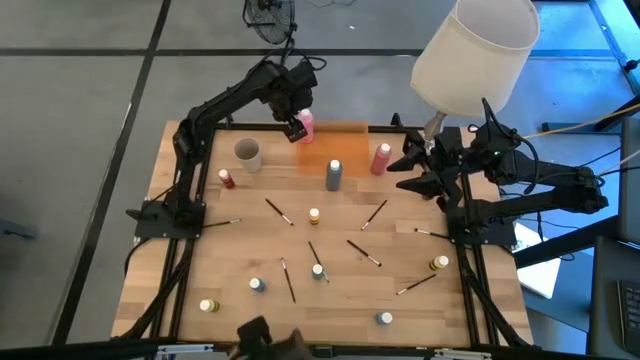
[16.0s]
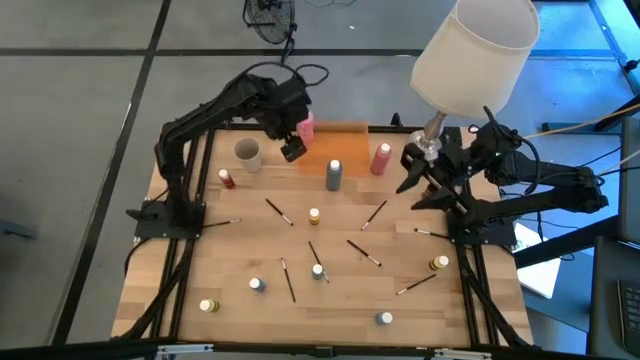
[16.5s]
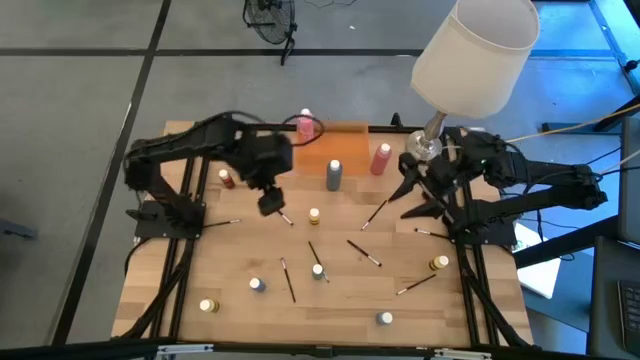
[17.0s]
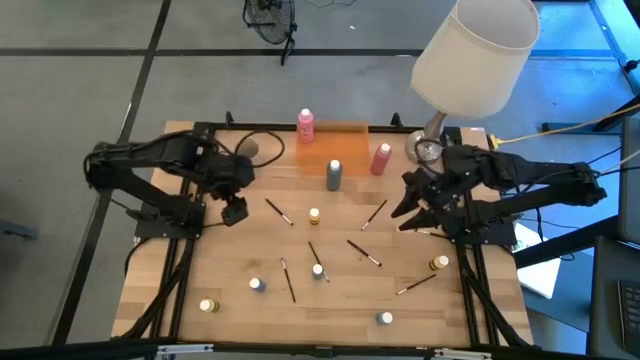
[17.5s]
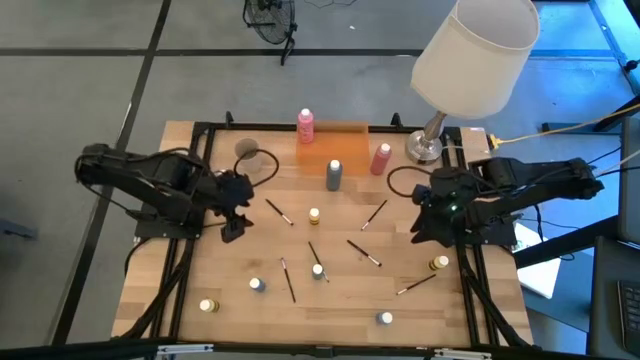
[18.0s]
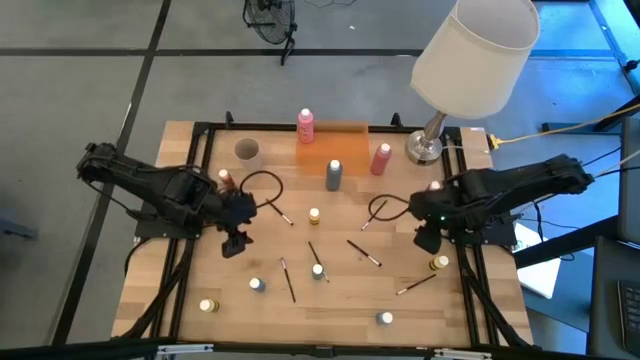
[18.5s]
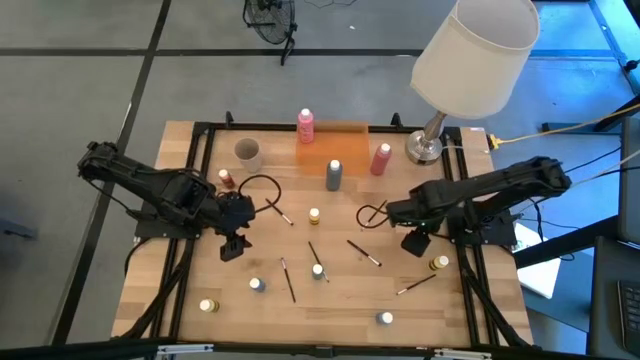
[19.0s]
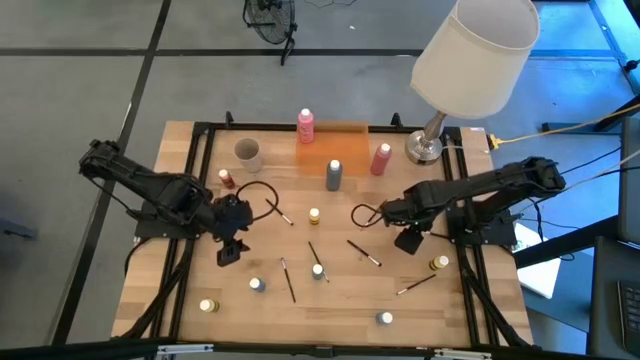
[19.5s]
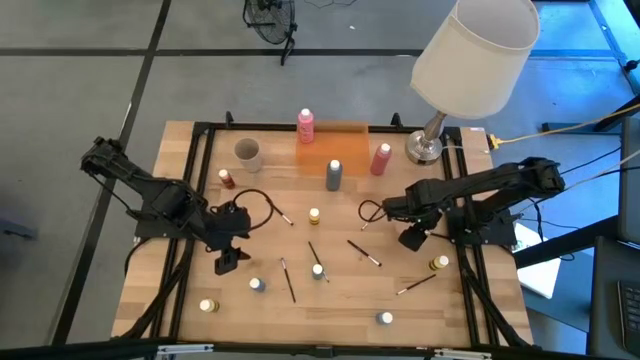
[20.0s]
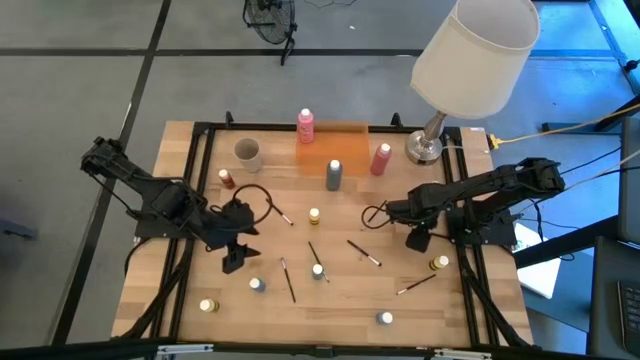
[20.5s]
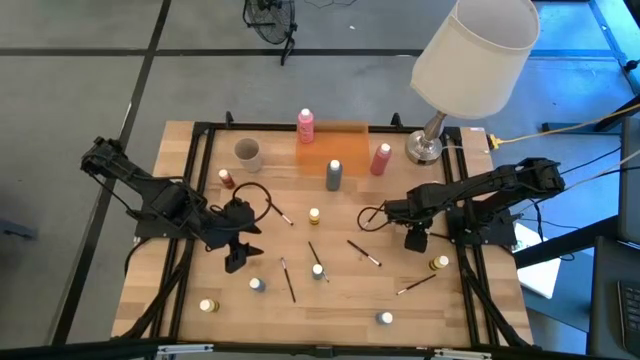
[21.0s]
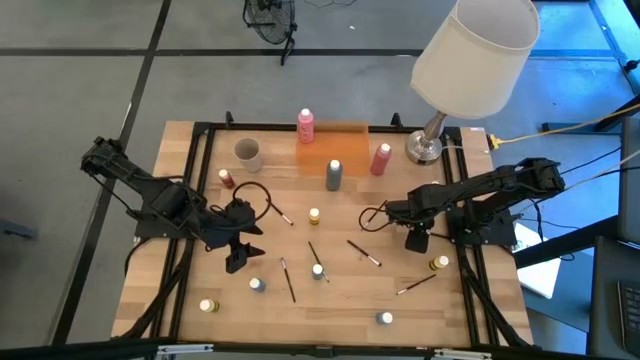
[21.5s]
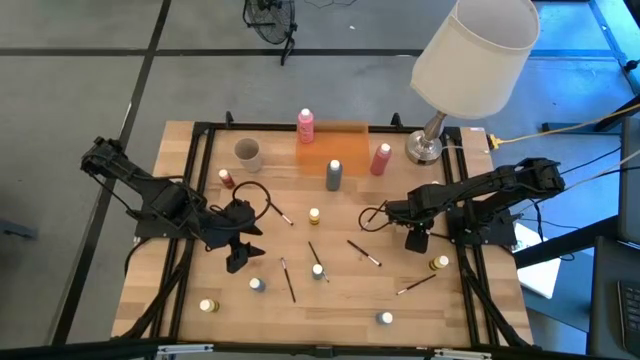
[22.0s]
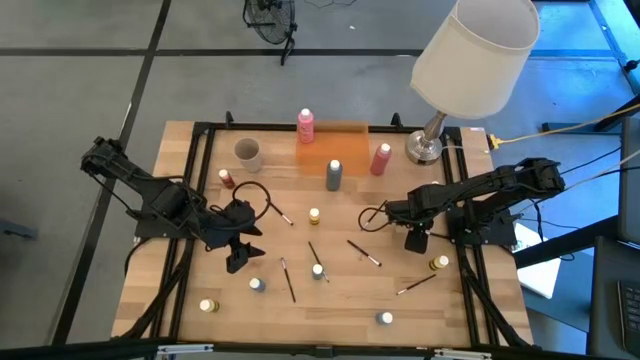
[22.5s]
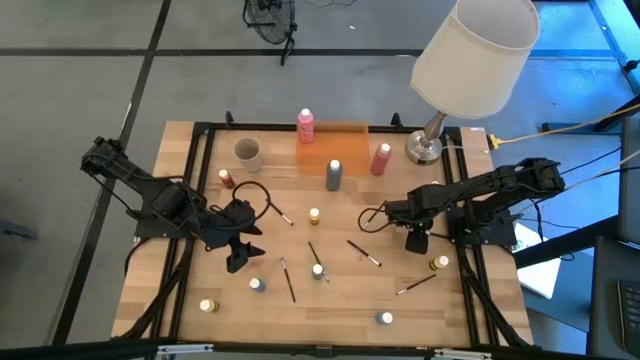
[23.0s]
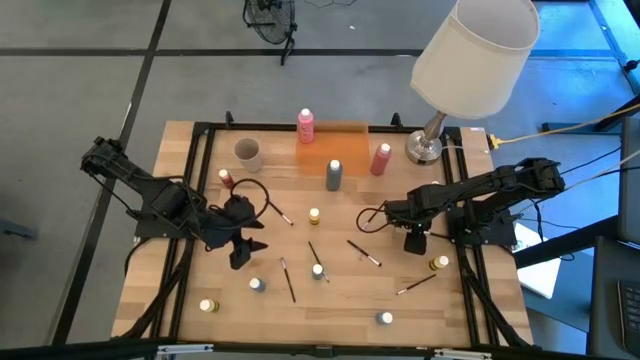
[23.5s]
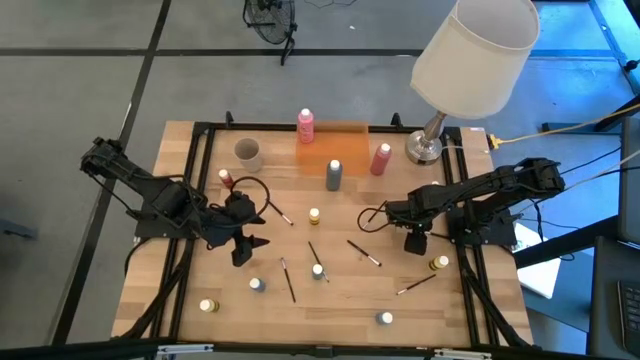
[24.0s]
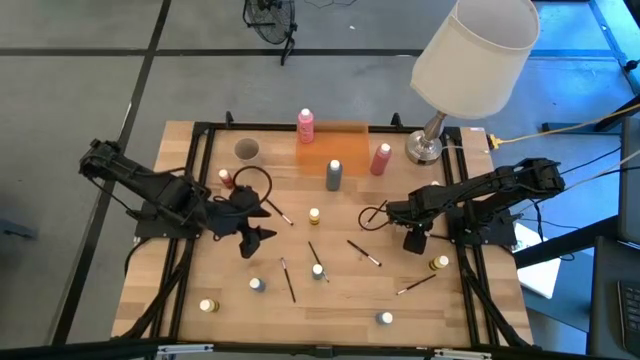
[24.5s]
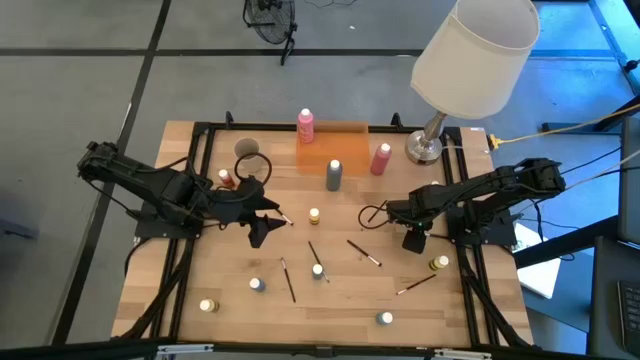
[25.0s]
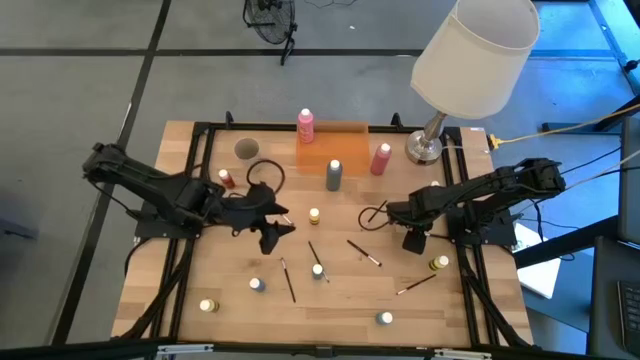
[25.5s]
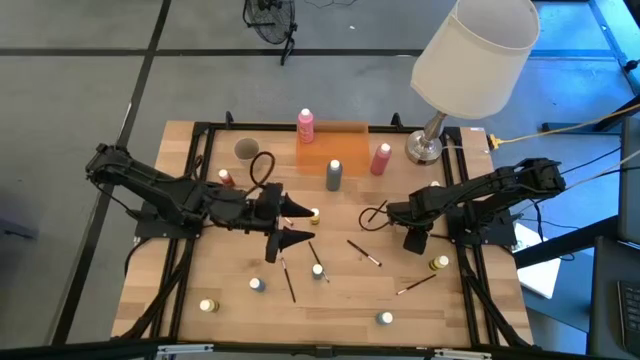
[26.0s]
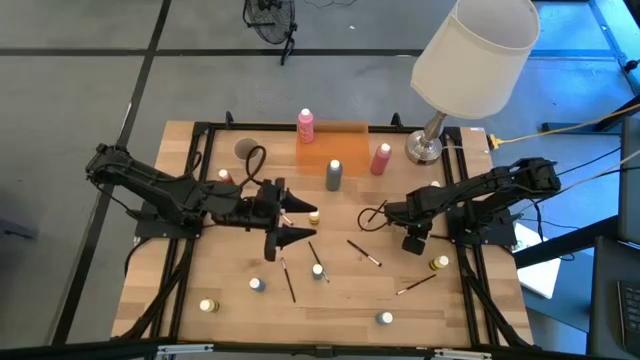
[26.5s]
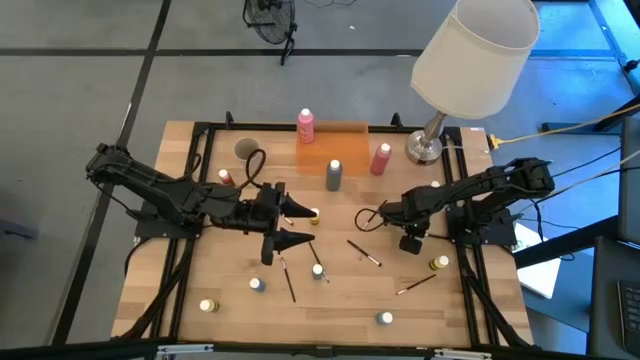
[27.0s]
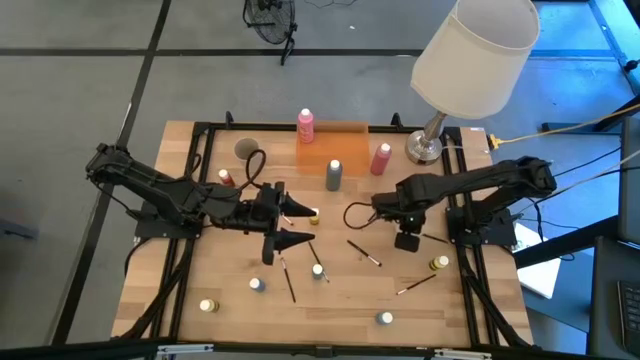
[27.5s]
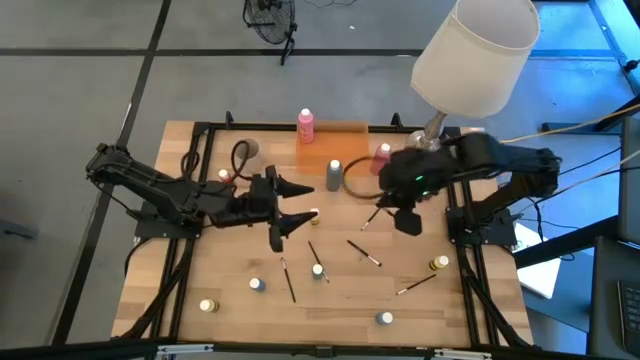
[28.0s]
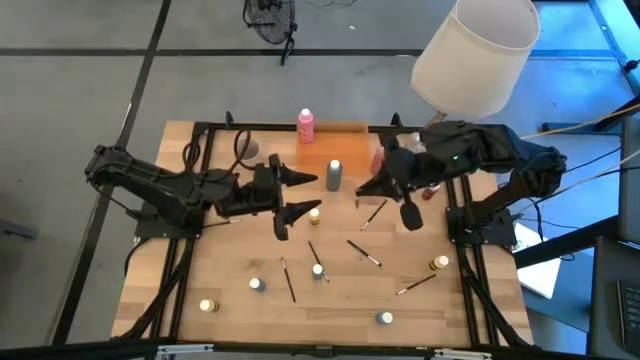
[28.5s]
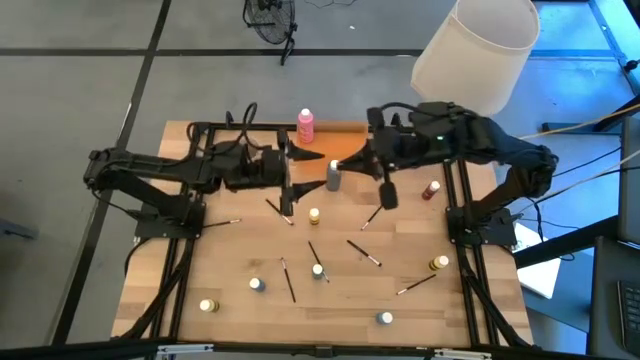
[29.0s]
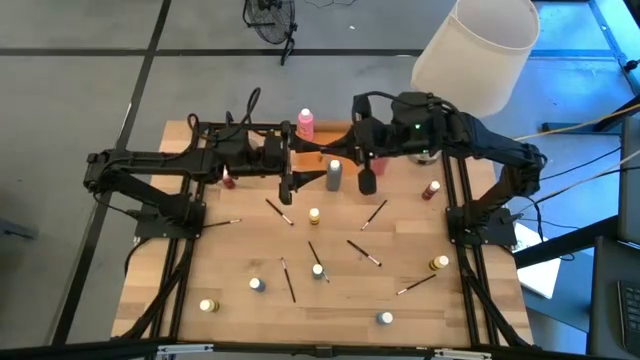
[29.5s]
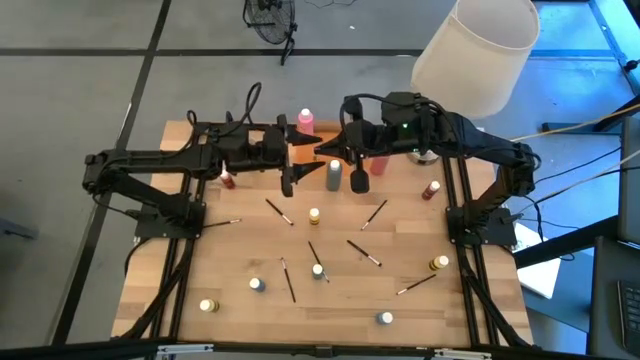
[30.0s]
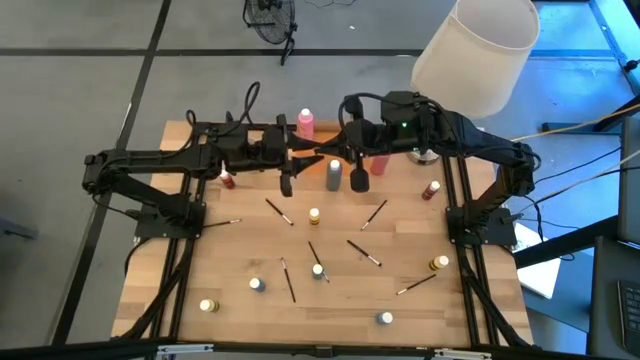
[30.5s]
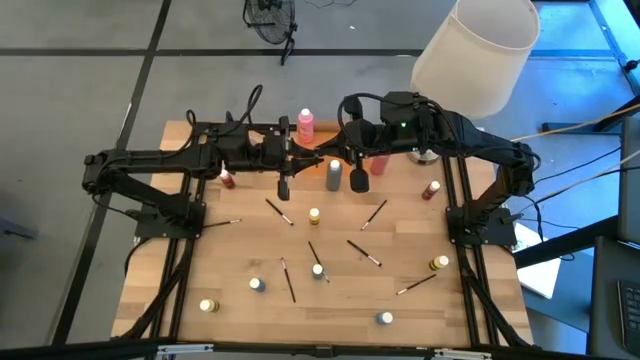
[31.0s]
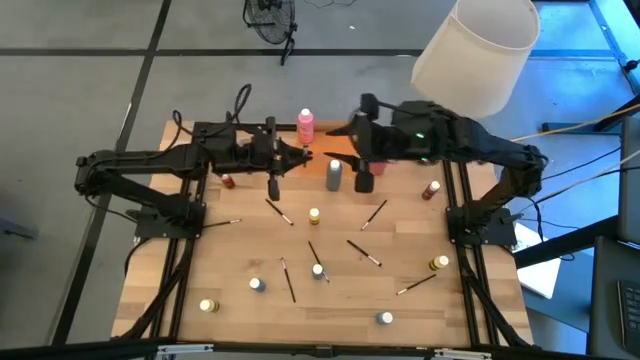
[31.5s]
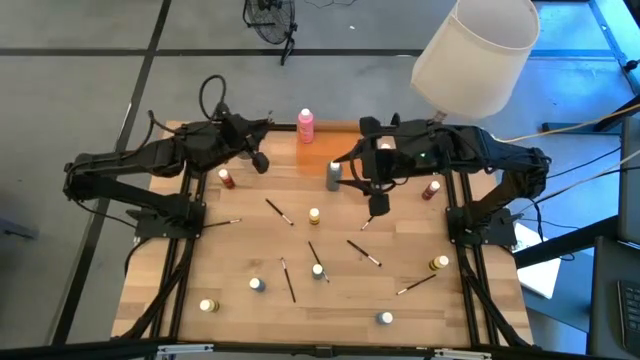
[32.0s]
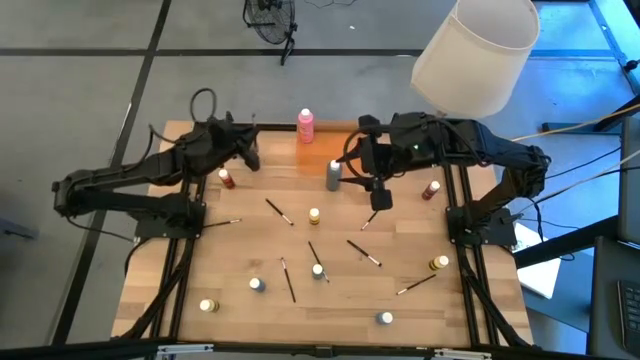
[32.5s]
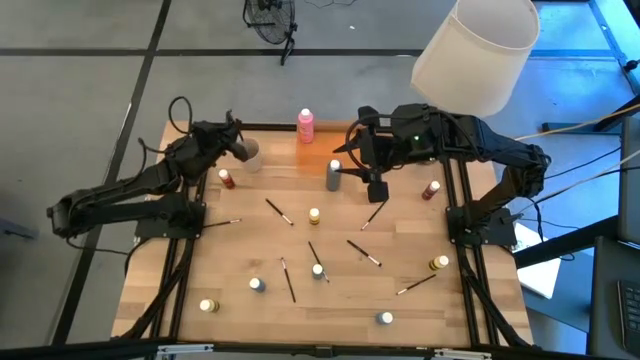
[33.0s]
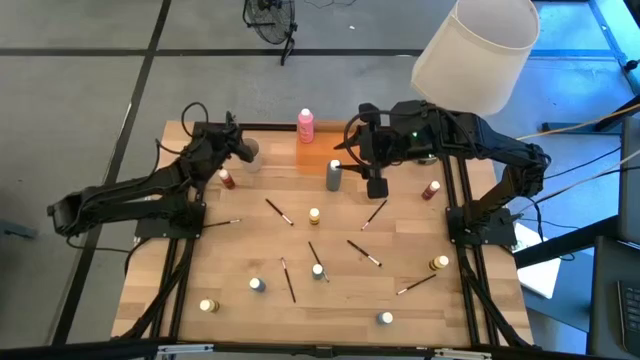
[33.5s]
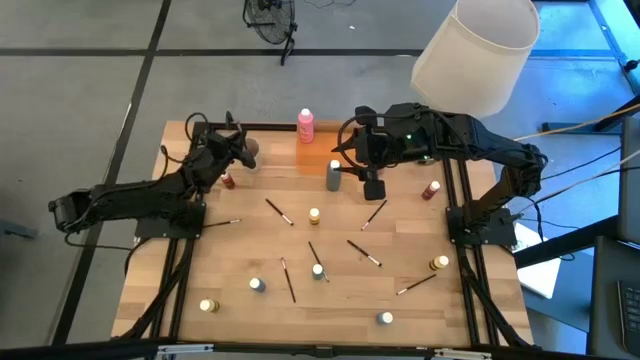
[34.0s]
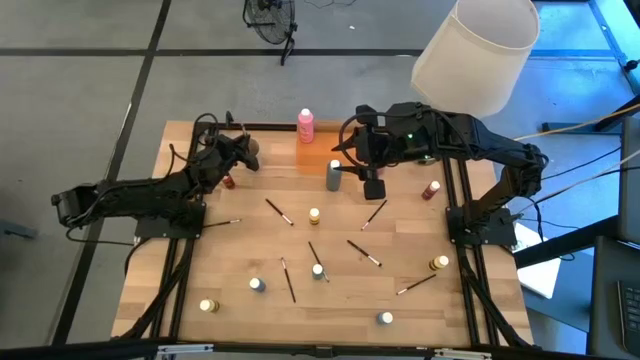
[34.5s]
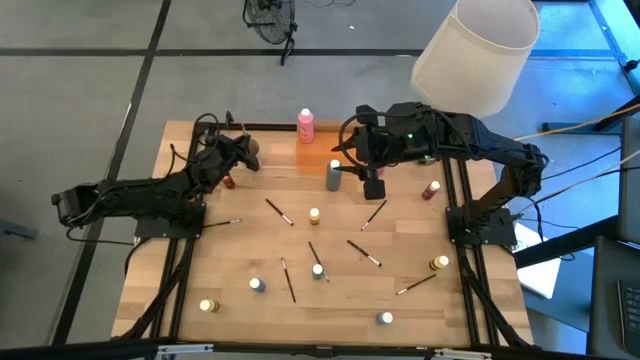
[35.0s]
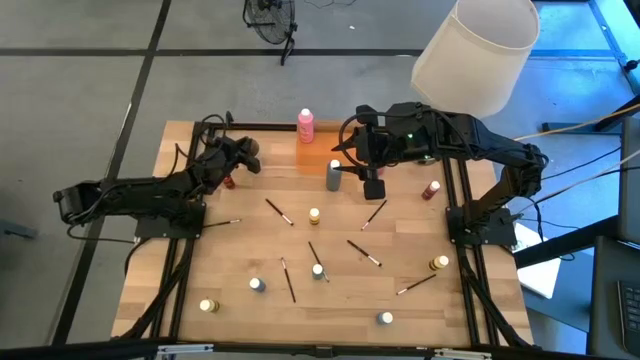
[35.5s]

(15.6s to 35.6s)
Task: Pick & Place Paint Supplies
Put the silver paint brush into the white cup
